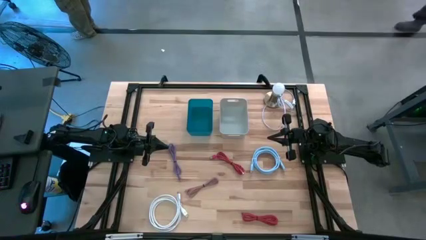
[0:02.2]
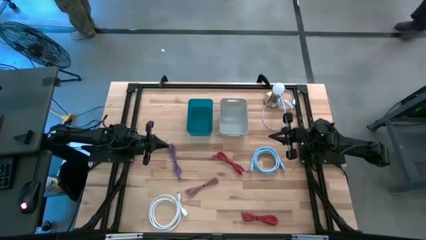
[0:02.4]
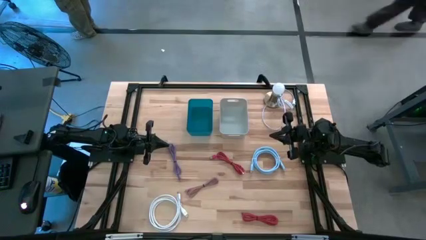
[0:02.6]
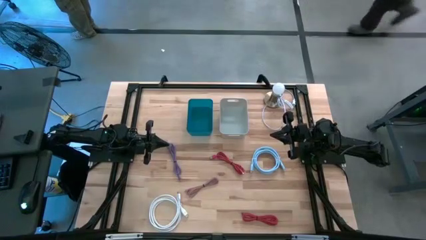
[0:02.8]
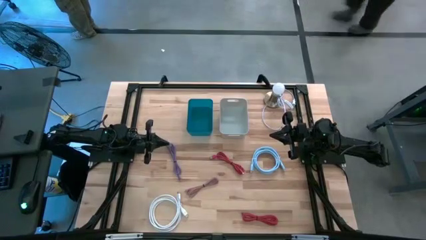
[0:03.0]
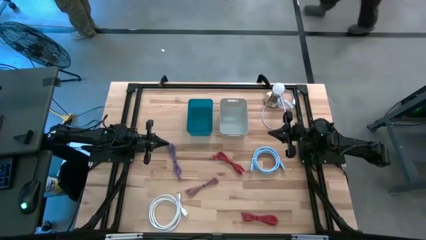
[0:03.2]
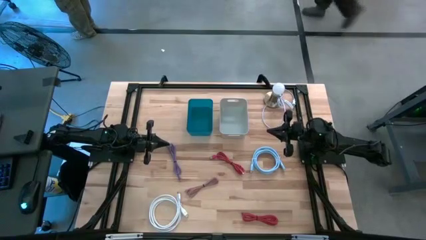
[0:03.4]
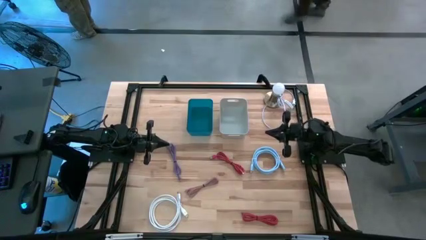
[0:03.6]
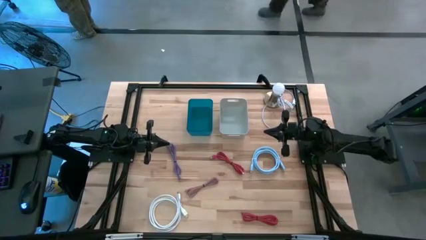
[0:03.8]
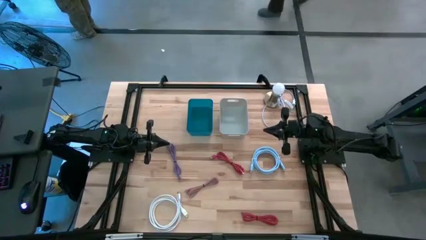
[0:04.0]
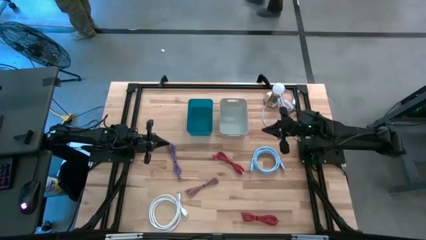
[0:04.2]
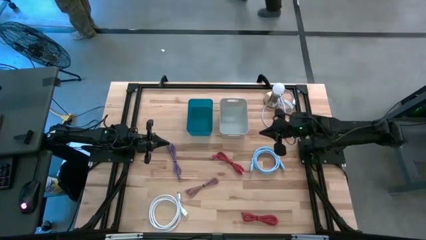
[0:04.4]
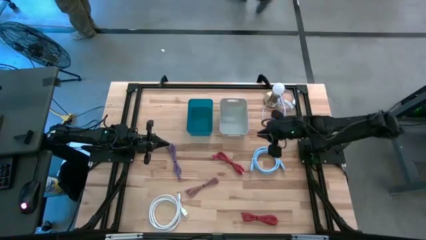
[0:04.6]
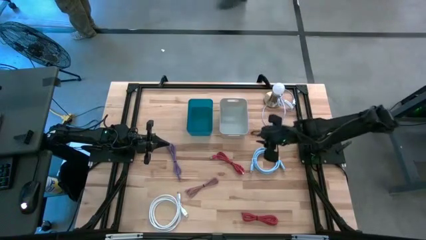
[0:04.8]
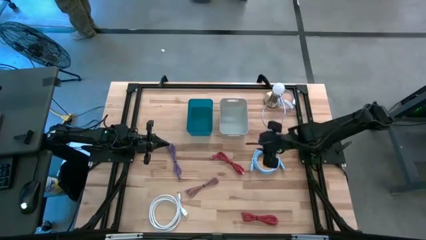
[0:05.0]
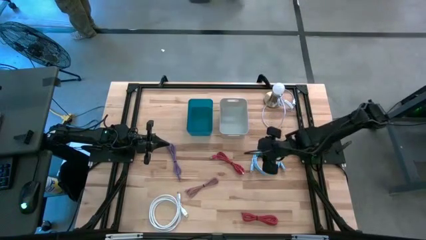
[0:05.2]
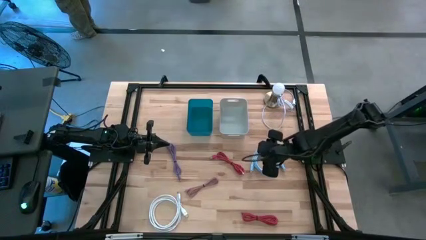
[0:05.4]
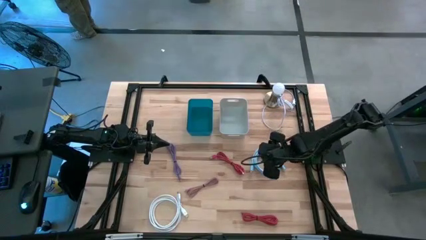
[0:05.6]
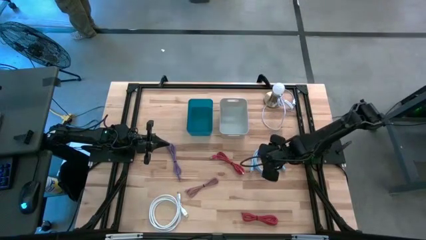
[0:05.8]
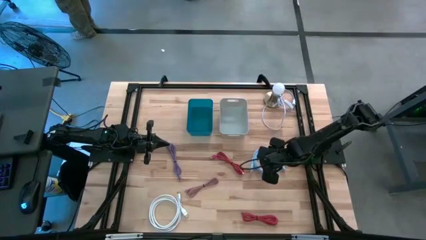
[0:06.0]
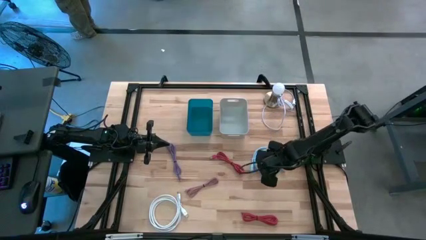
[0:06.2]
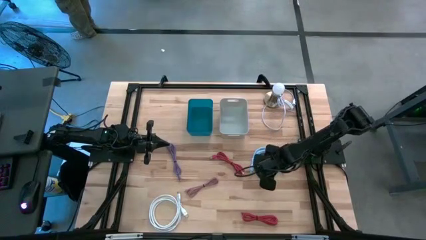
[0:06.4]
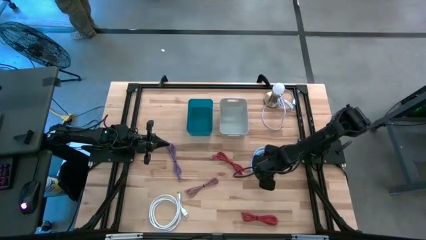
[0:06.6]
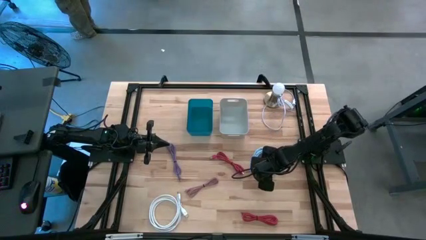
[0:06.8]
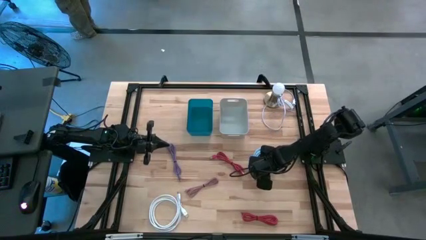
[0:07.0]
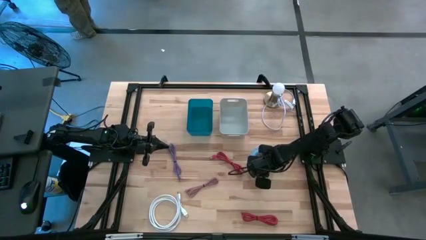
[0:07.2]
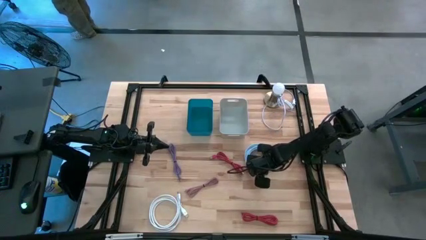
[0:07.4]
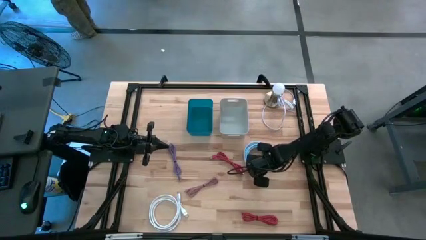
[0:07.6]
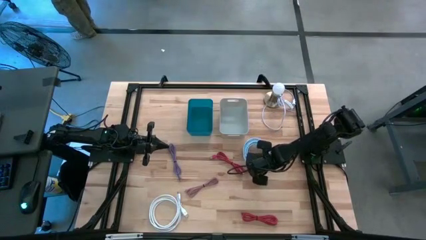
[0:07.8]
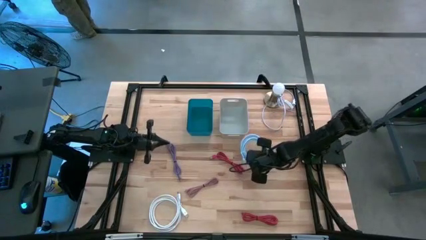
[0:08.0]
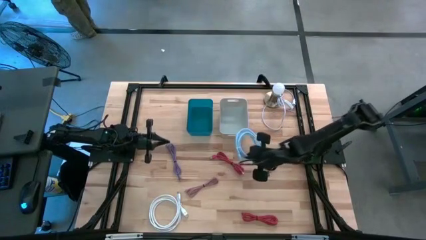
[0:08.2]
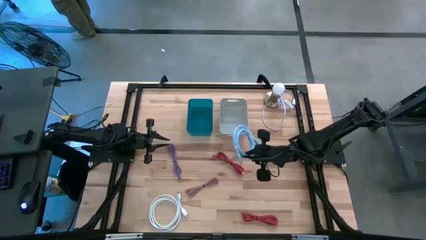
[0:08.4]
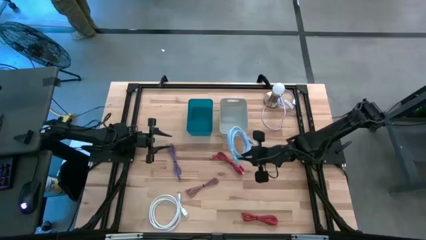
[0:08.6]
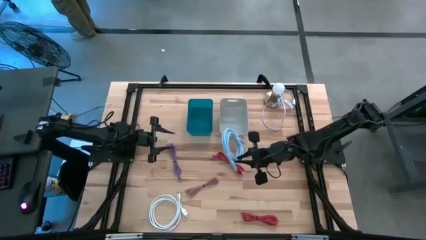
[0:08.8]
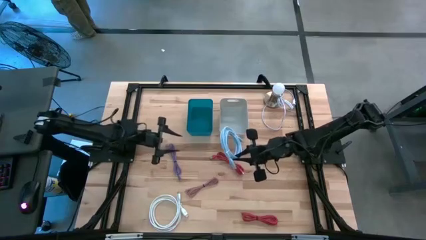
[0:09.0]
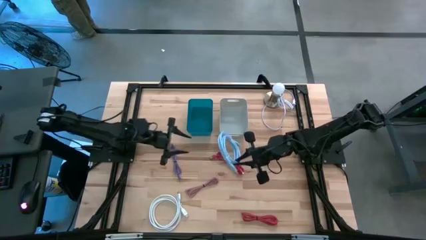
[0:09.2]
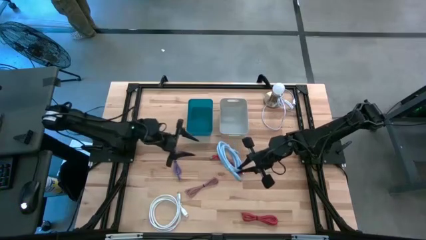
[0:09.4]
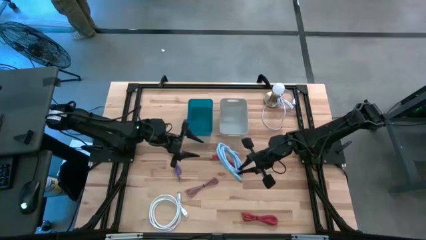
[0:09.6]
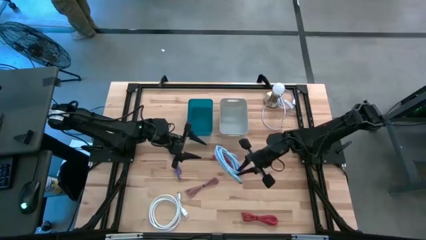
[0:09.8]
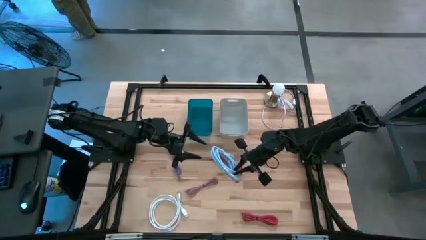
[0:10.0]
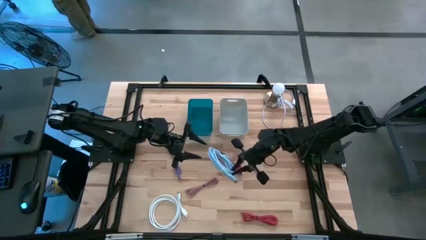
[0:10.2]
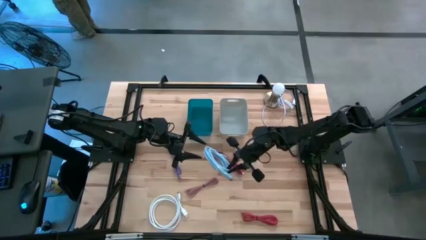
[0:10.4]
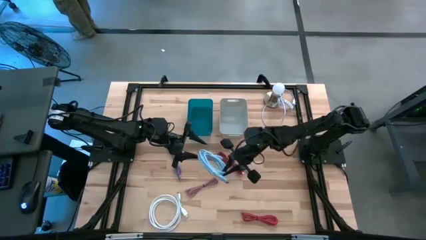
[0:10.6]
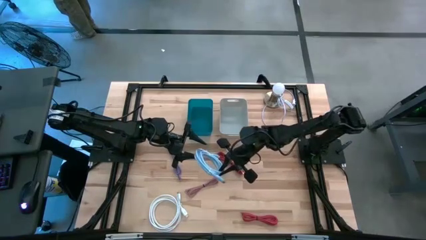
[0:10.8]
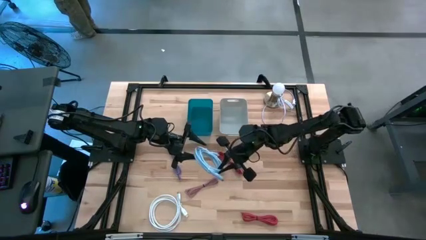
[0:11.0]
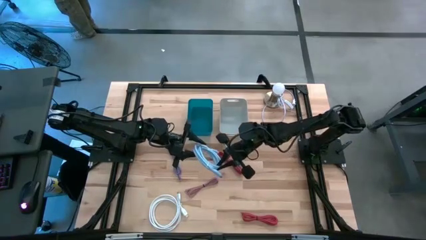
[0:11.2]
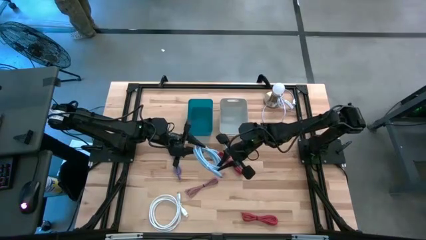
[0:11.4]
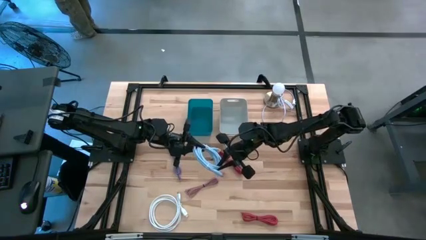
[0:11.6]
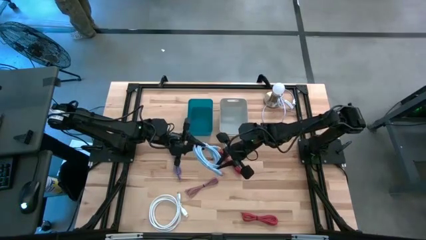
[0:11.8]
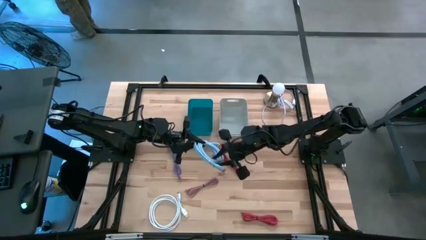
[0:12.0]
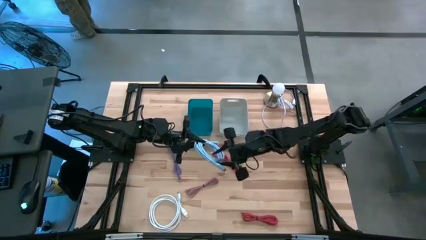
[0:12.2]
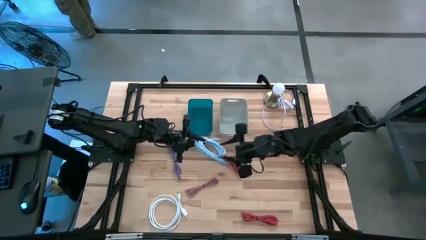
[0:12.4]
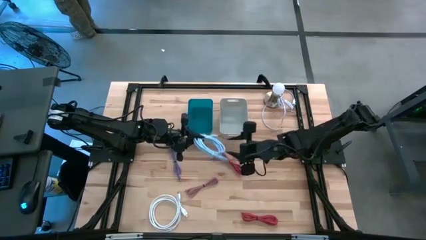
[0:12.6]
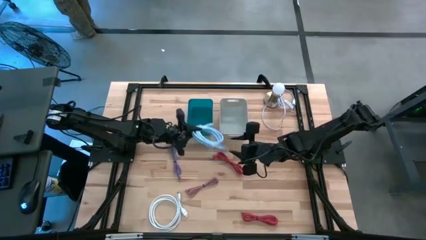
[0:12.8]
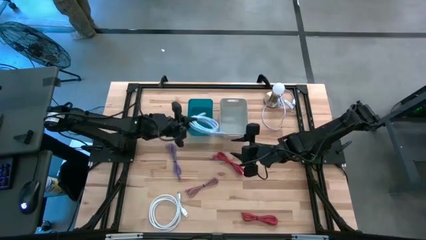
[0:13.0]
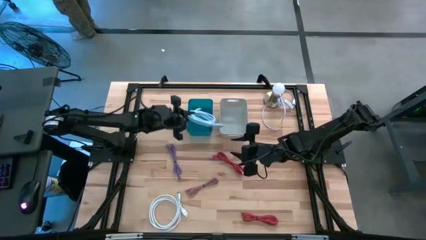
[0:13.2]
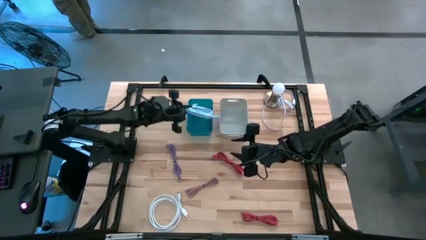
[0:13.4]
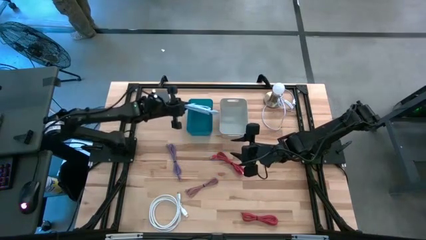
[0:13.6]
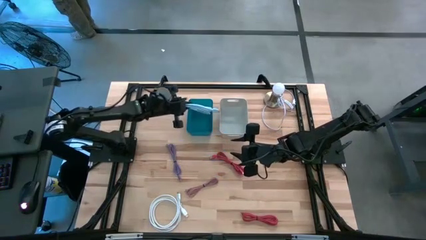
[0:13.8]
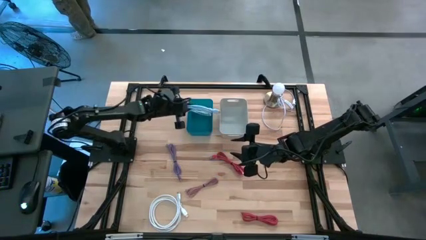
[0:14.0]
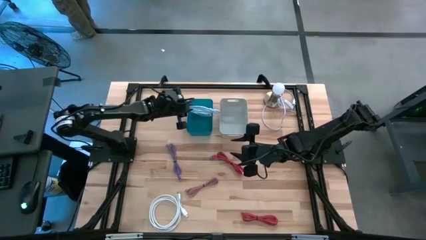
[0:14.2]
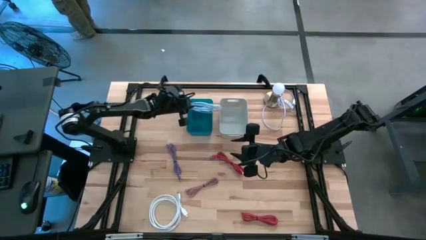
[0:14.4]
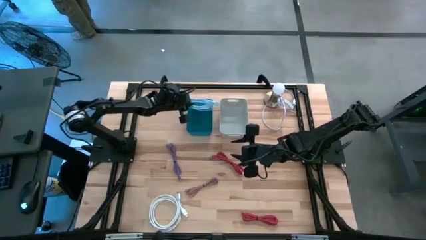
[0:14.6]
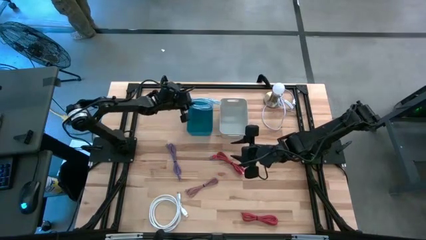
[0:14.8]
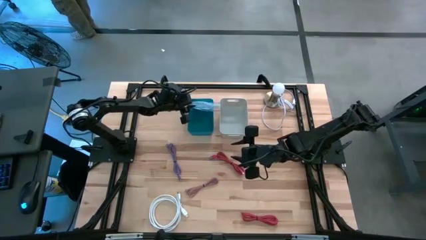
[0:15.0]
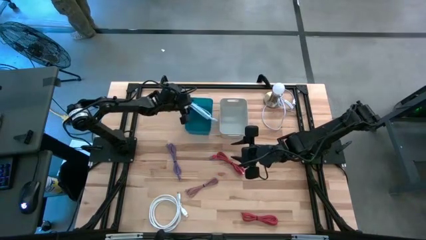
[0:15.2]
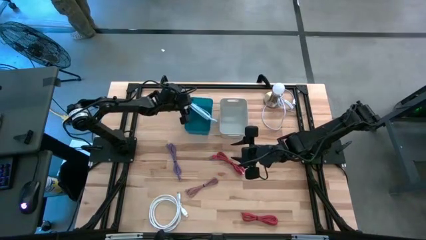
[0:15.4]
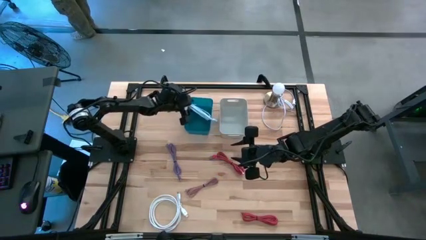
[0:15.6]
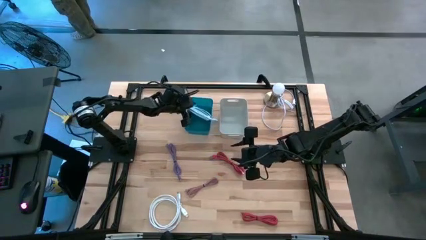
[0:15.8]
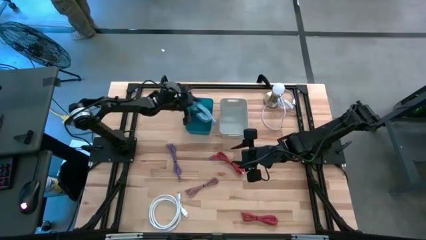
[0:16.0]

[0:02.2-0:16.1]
Task: Pick & Place USB Port
Put the blue HDMI cable into the blue bin
